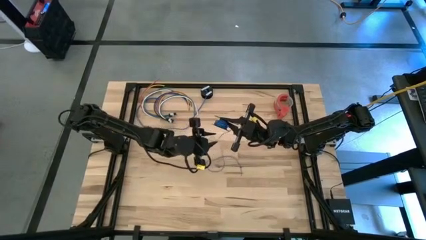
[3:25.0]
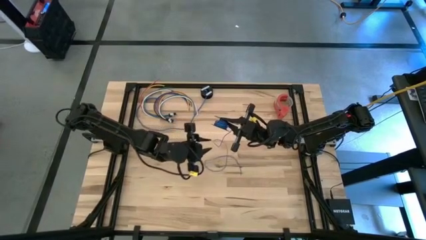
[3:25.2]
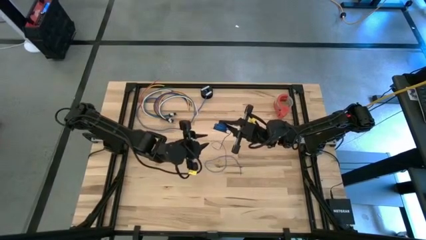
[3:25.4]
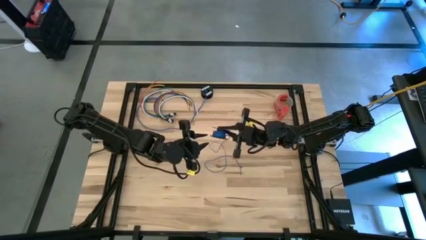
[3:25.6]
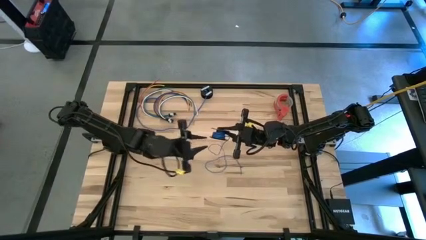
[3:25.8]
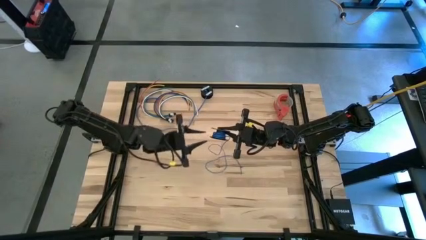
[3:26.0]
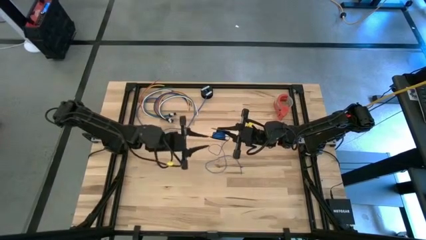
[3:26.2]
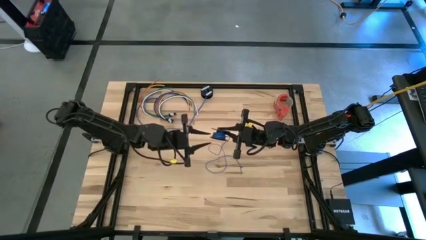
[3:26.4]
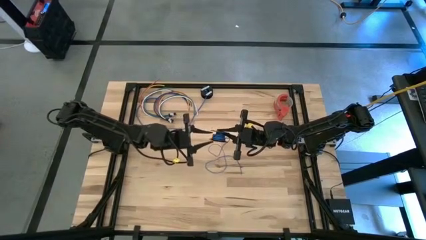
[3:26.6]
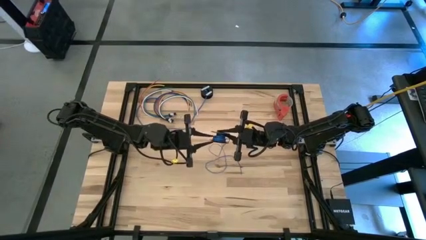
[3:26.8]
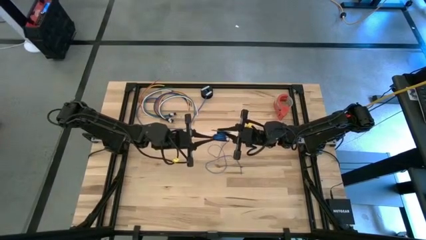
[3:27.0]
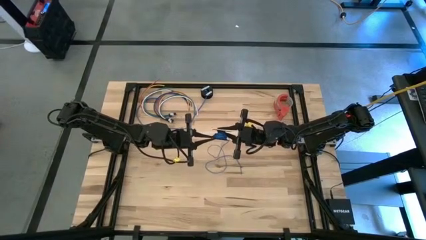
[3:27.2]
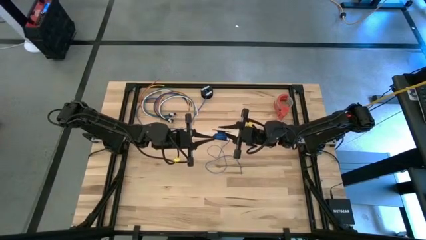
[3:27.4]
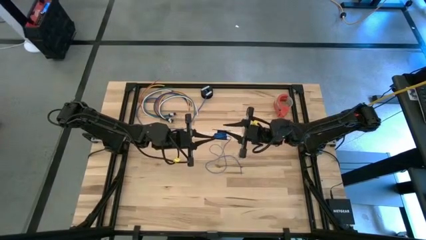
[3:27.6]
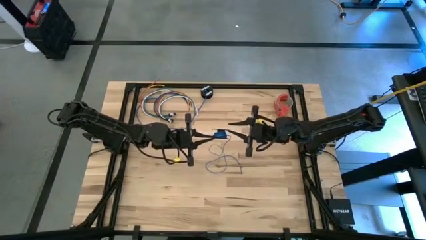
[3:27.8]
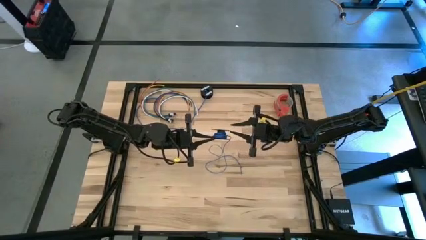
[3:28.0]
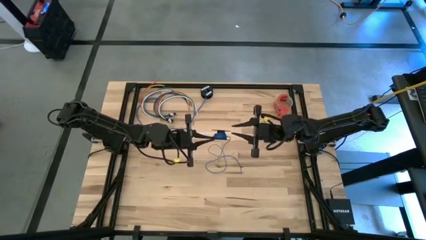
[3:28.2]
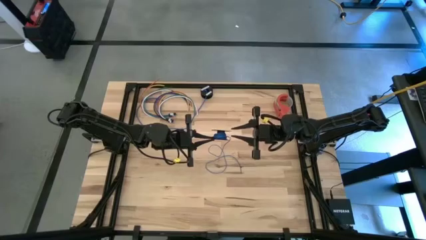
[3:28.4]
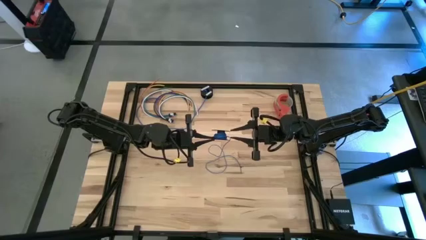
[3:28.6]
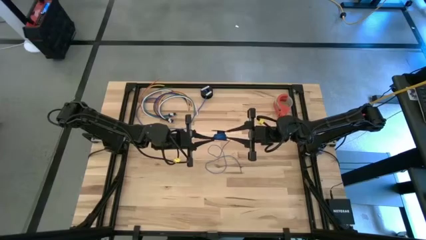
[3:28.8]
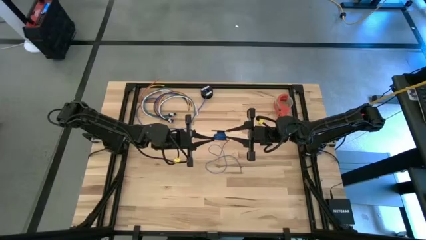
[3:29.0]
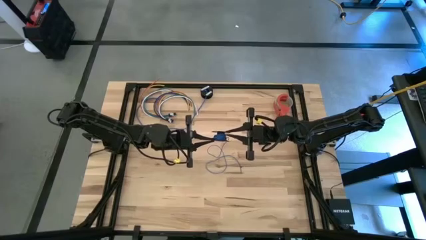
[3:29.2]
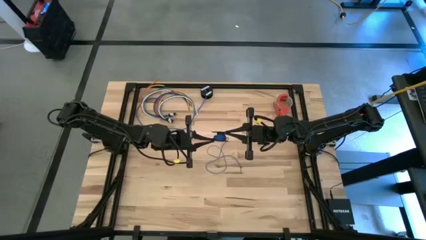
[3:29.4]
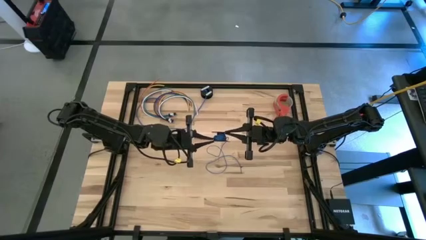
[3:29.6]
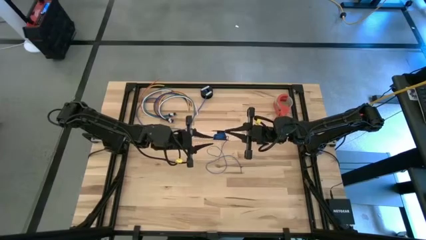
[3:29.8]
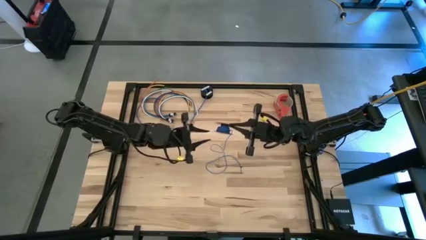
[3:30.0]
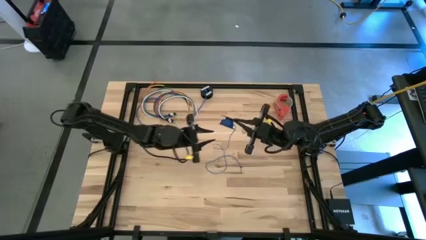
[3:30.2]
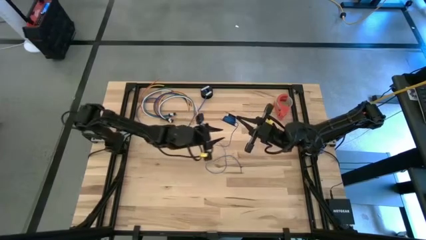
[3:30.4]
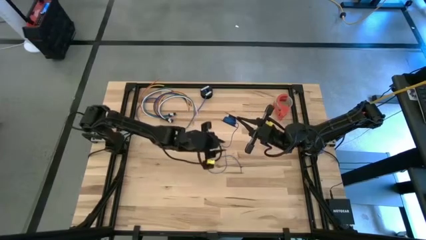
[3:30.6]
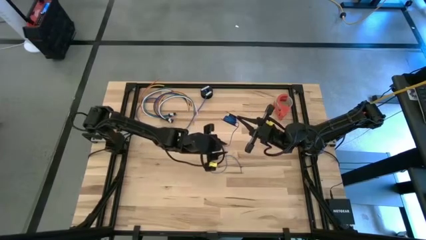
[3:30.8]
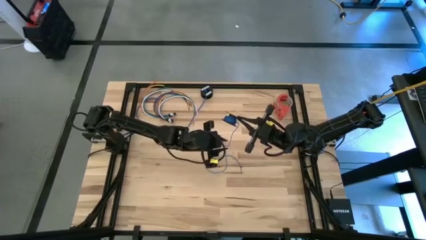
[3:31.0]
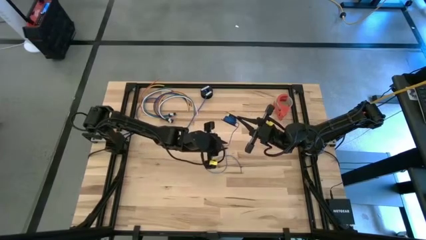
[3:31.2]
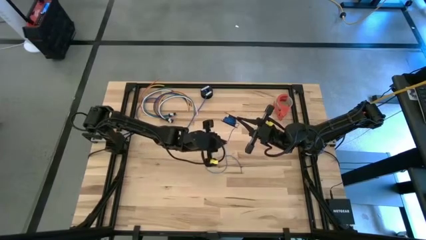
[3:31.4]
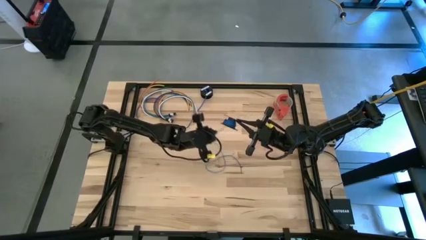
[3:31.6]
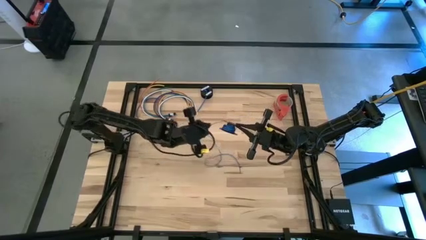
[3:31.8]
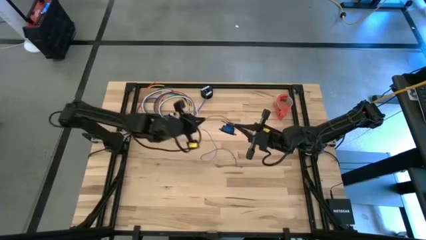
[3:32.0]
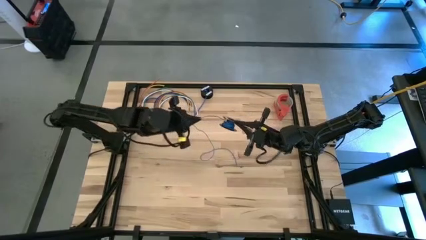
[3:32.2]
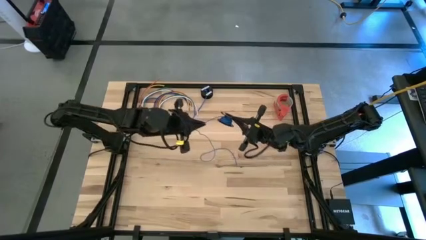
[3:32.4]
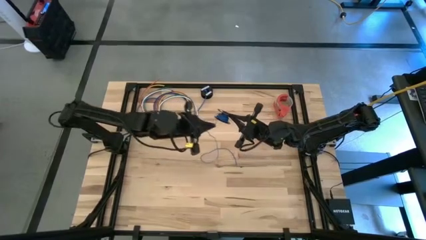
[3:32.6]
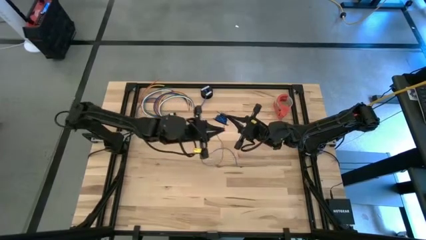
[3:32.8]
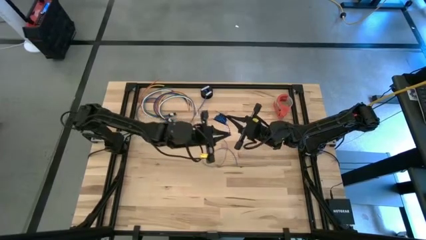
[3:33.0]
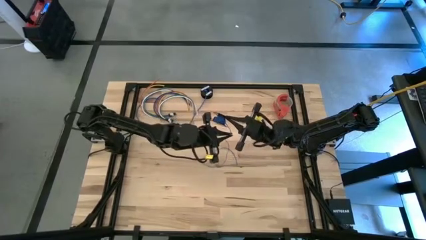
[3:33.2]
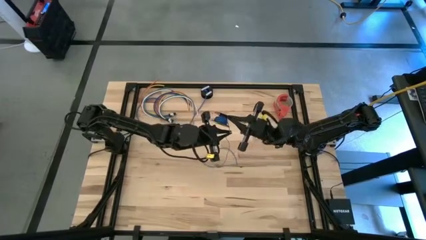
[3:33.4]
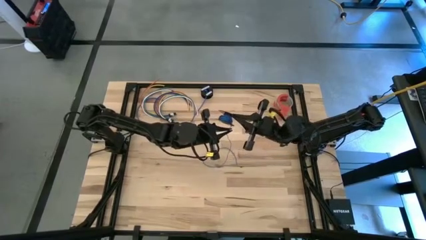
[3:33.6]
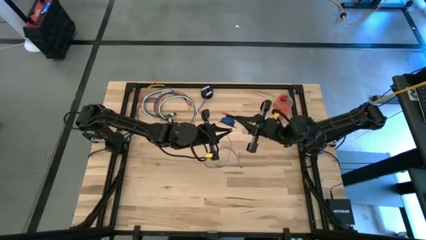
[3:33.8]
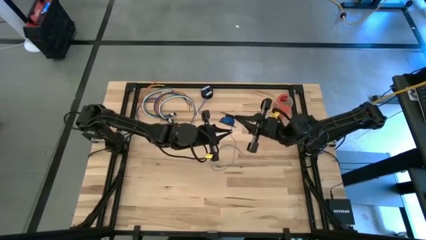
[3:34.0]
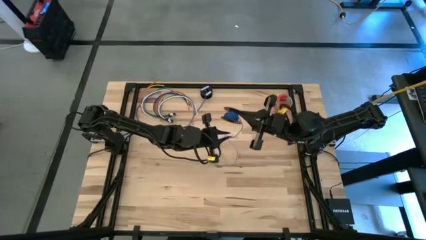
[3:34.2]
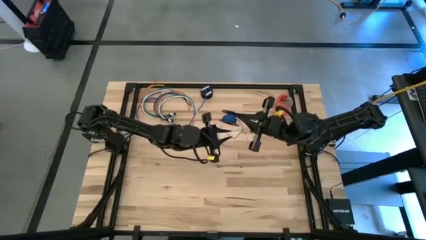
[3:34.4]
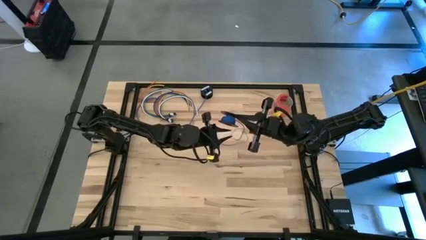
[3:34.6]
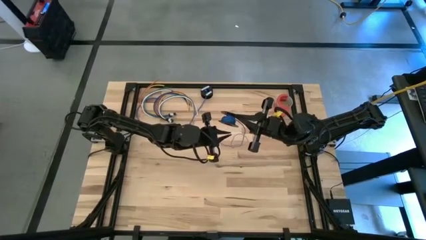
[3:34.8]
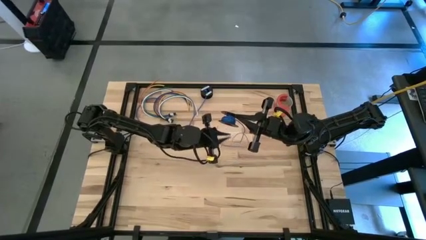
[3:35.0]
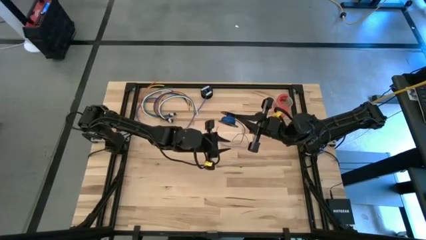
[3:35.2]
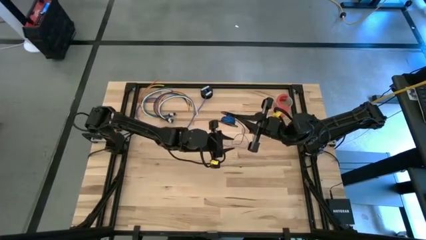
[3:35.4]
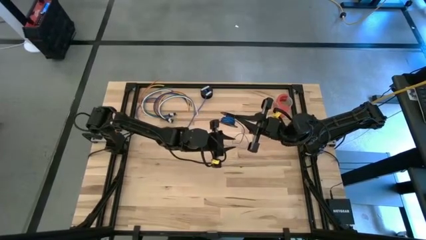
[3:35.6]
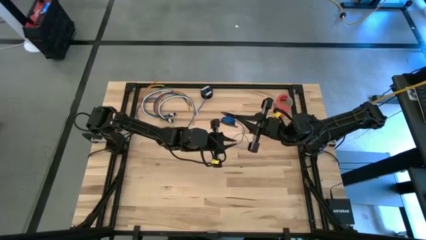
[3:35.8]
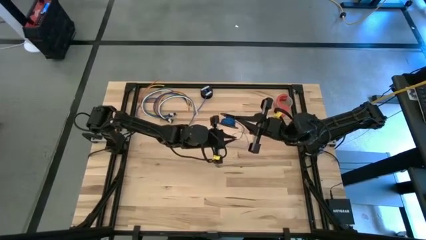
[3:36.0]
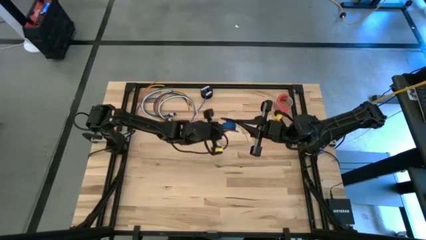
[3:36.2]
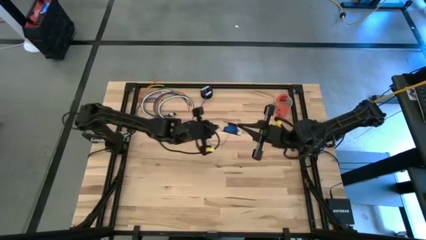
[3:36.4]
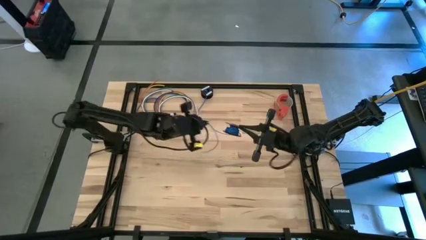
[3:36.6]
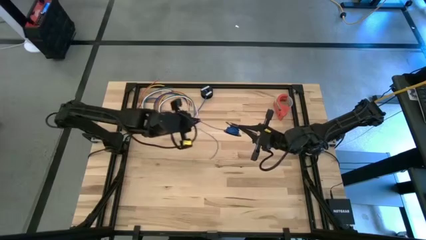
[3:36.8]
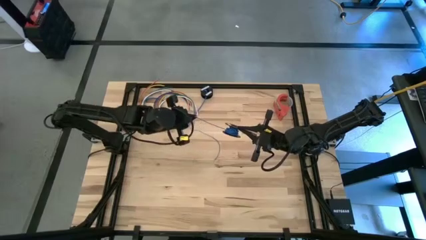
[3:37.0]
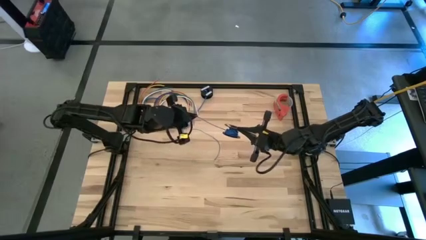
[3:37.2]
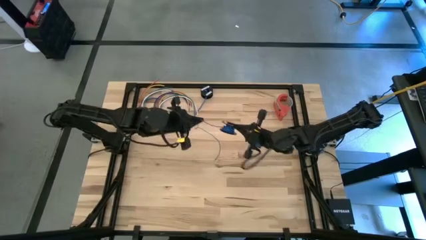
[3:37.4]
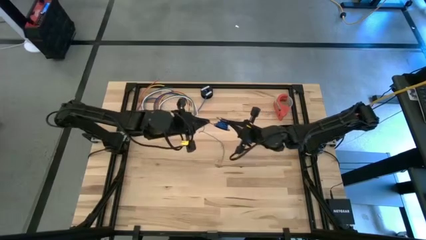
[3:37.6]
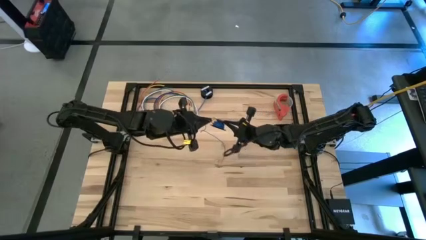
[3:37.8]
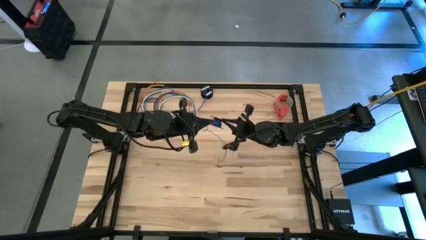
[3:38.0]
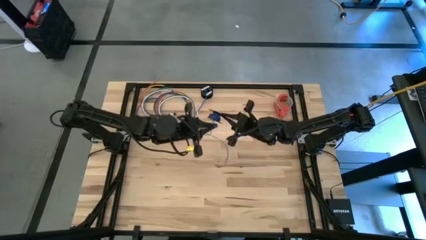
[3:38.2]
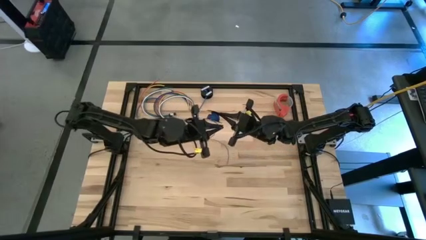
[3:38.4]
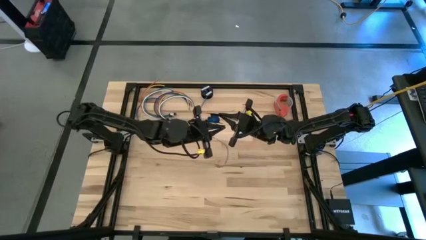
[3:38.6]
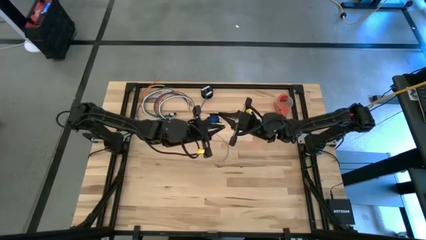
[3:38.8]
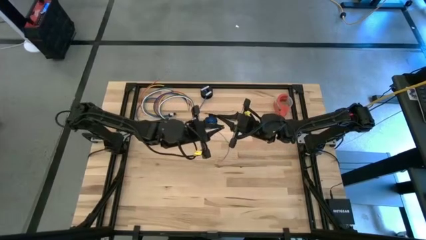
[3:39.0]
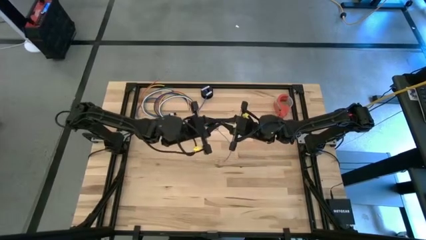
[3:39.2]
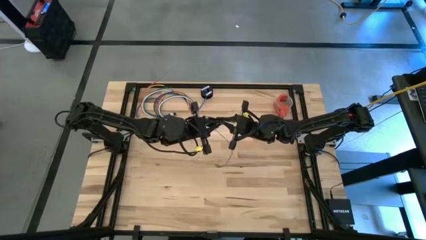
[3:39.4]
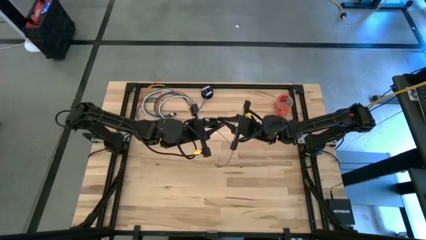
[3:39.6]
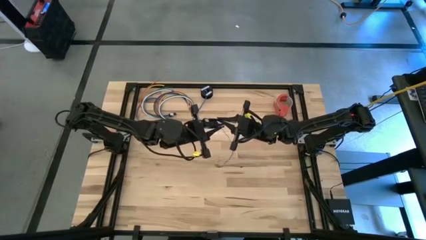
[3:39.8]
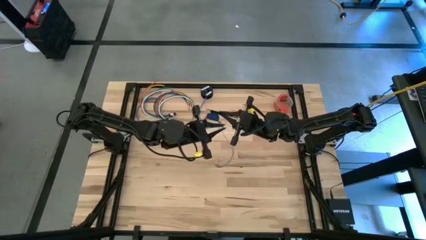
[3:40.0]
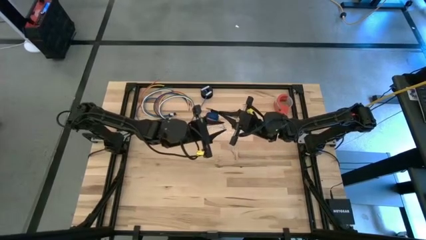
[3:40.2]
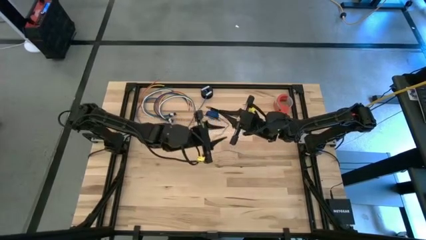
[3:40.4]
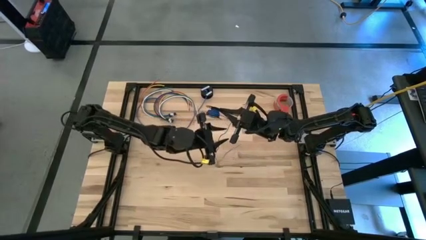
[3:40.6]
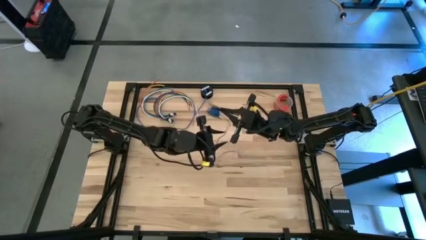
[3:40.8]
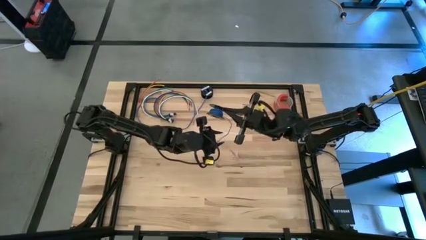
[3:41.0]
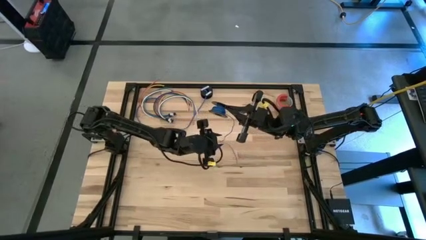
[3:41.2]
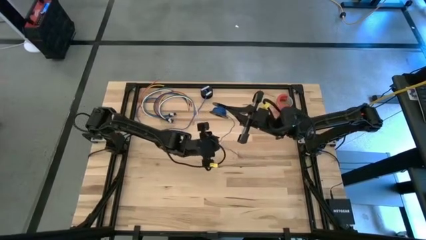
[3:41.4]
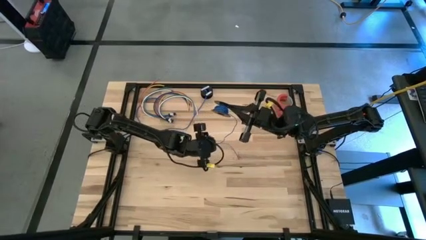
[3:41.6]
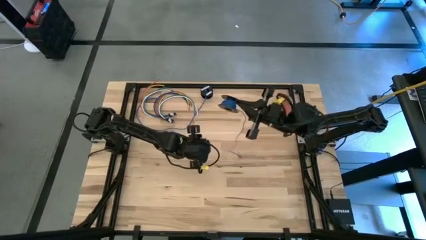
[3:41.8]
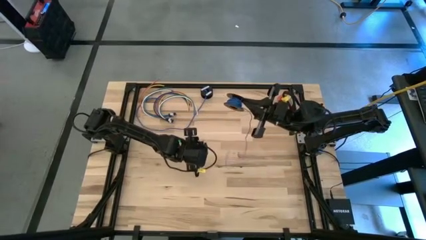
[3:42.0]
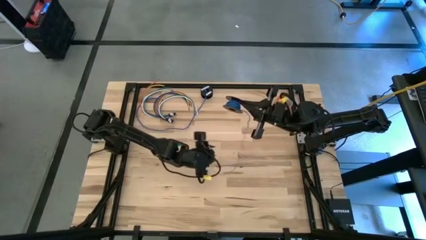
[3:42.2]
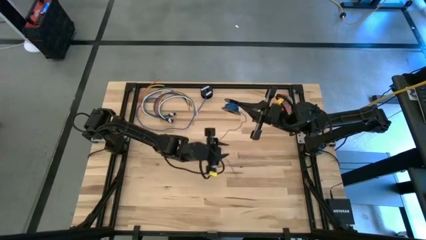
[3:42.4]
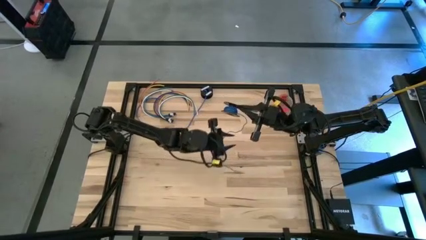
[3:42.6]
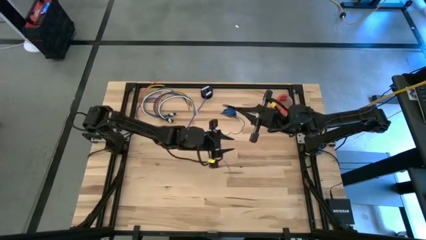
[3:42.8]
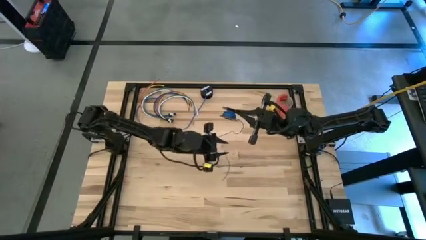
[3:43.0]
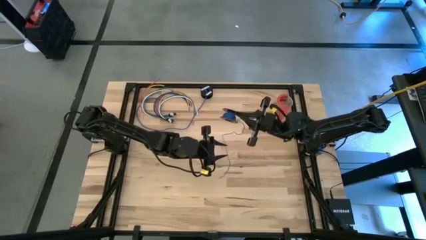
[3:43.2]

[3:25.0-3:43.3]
Task: Coil cords
Coil the blue wire onto the black spool
